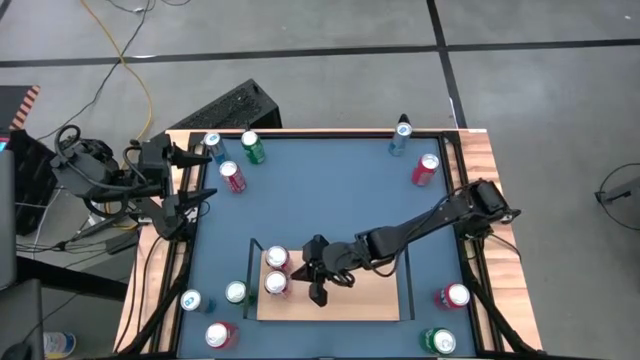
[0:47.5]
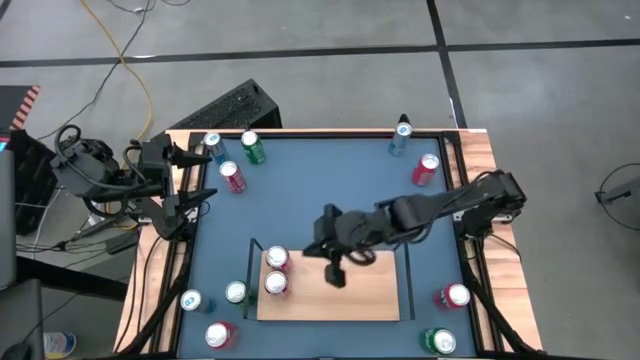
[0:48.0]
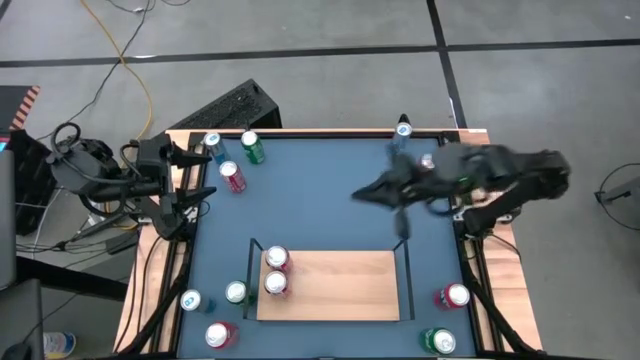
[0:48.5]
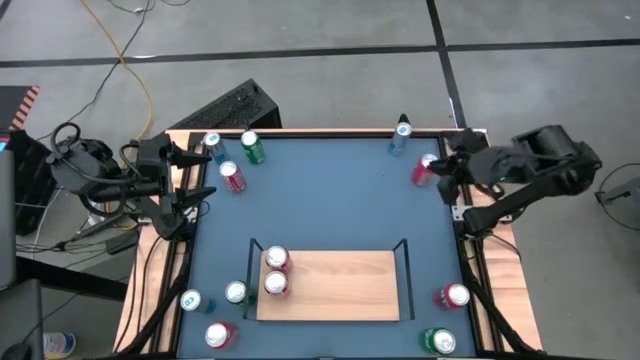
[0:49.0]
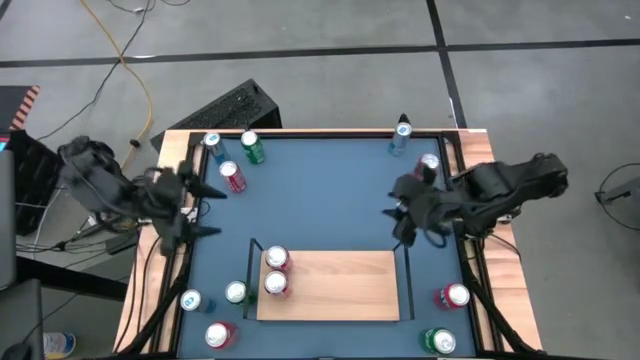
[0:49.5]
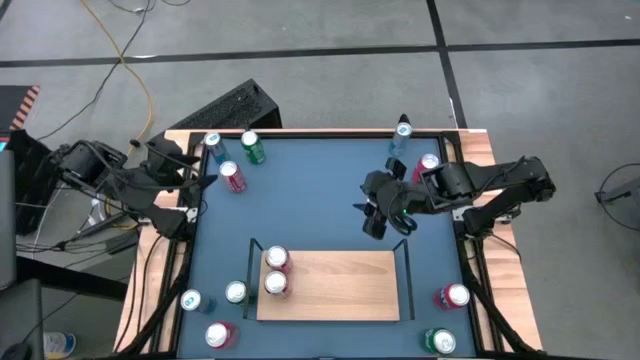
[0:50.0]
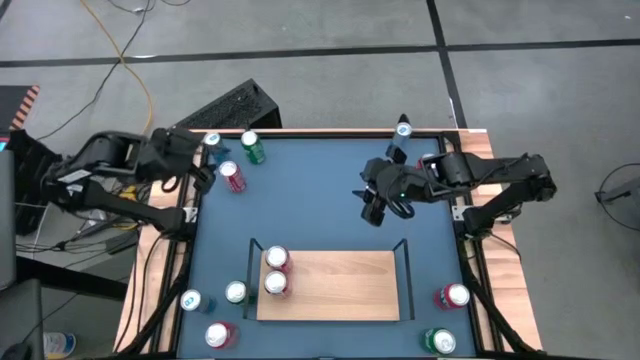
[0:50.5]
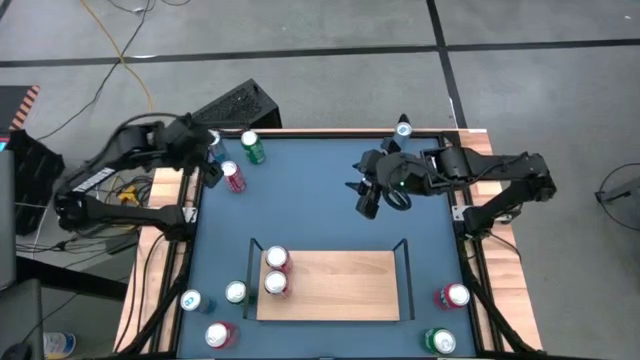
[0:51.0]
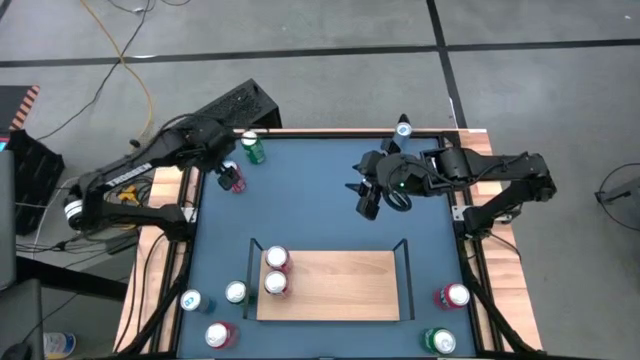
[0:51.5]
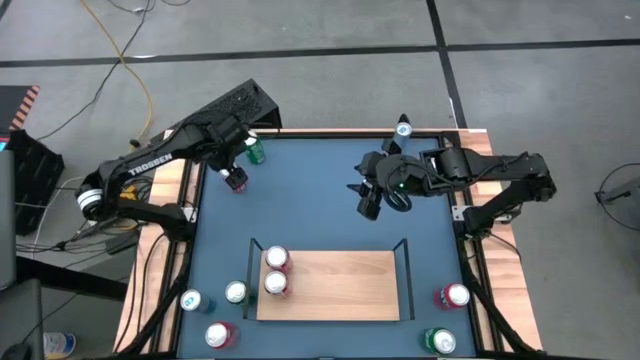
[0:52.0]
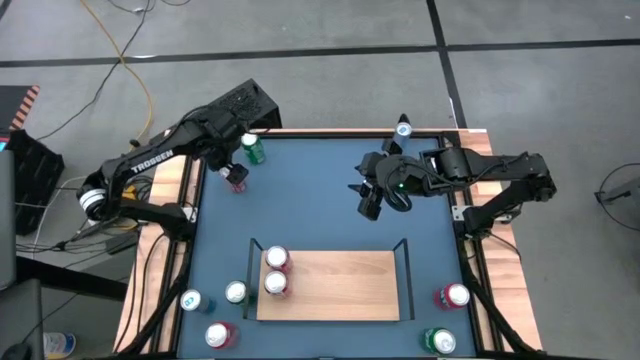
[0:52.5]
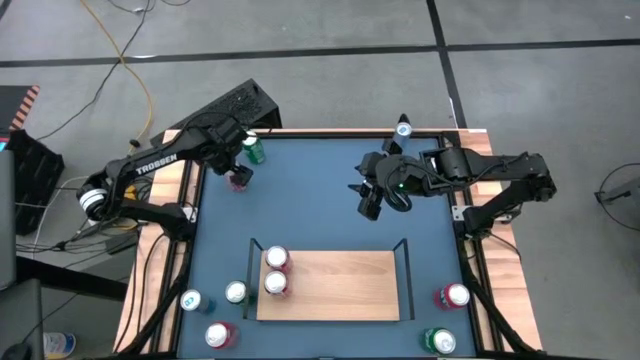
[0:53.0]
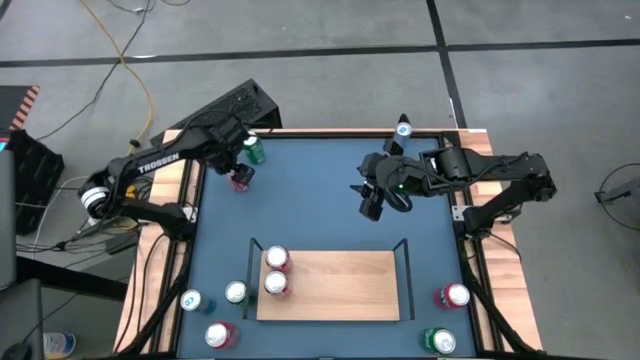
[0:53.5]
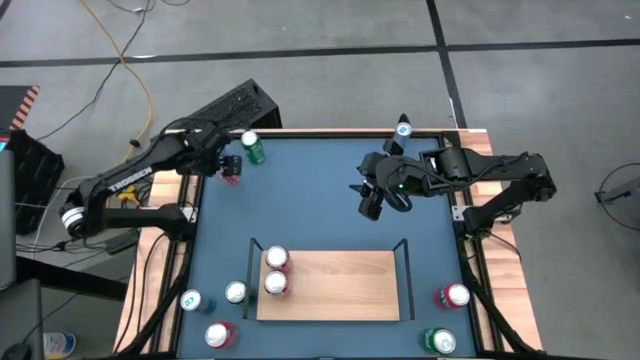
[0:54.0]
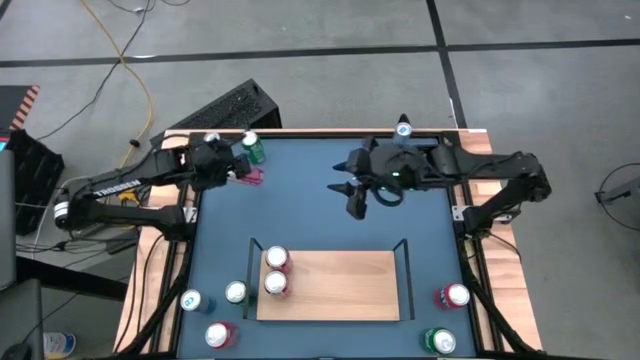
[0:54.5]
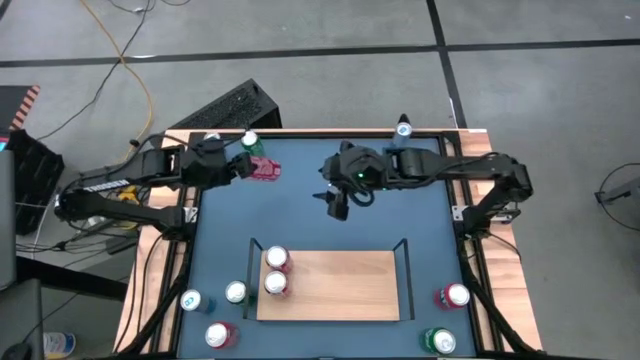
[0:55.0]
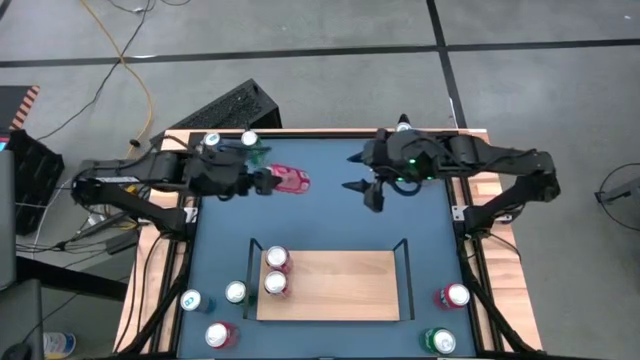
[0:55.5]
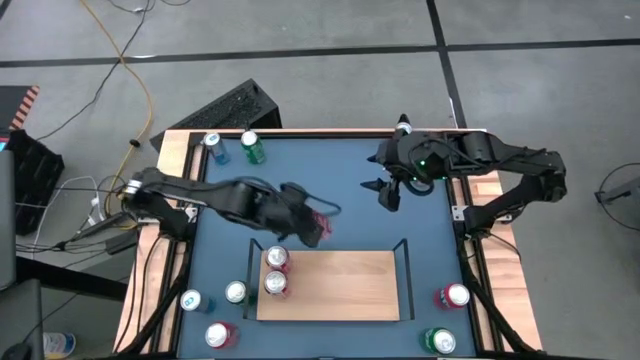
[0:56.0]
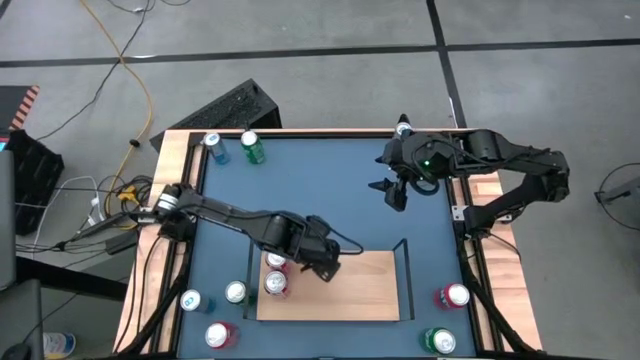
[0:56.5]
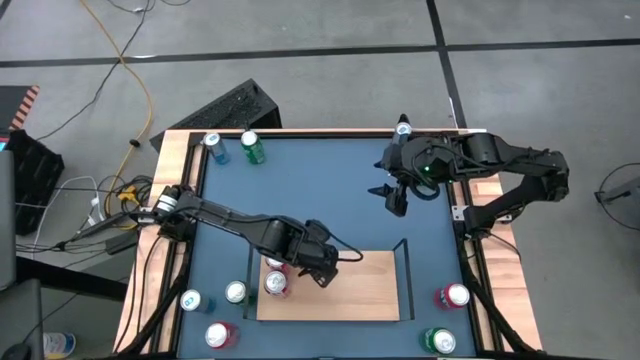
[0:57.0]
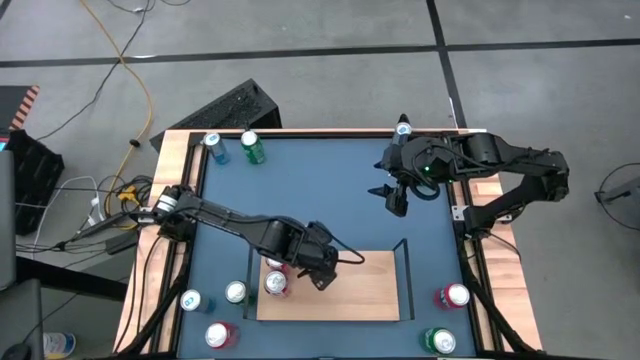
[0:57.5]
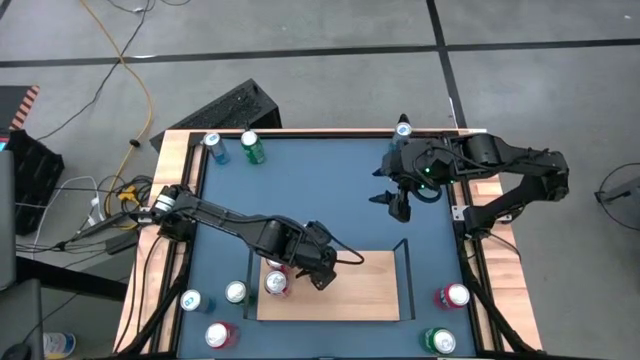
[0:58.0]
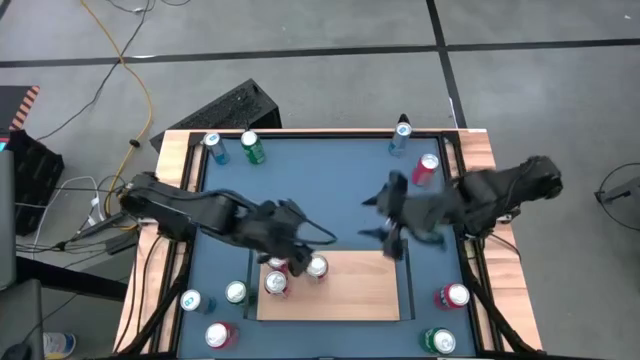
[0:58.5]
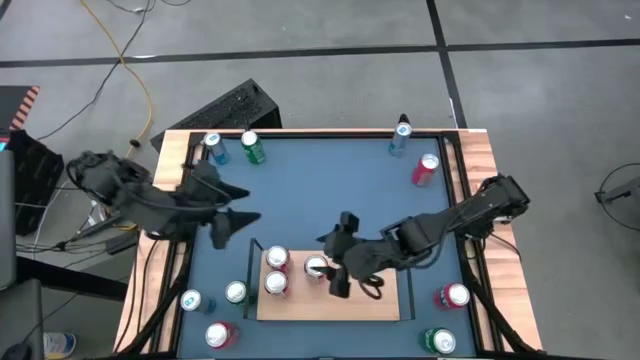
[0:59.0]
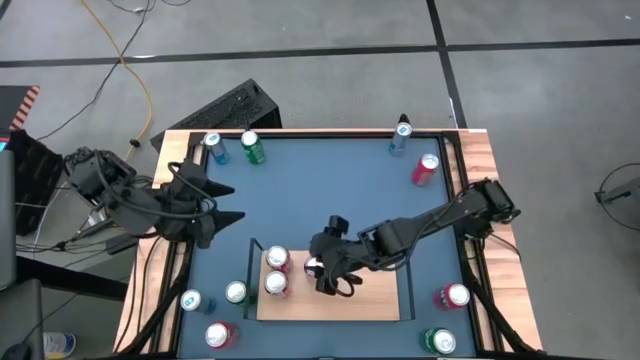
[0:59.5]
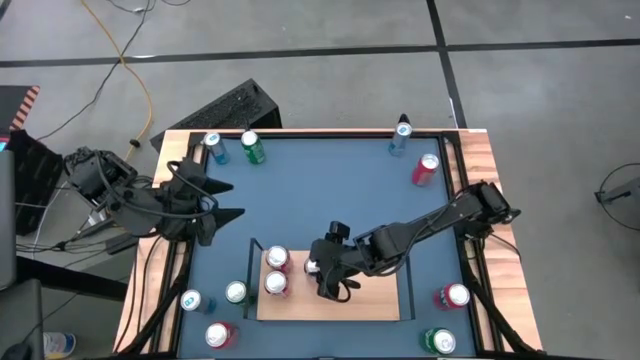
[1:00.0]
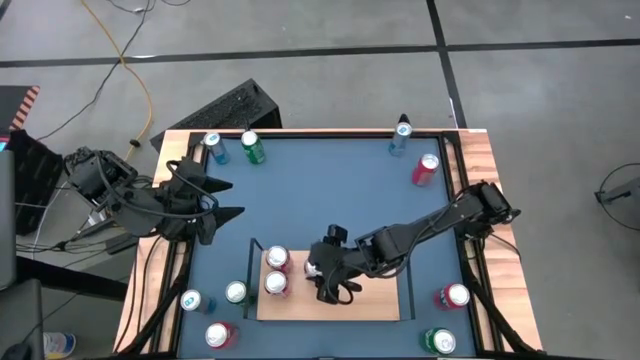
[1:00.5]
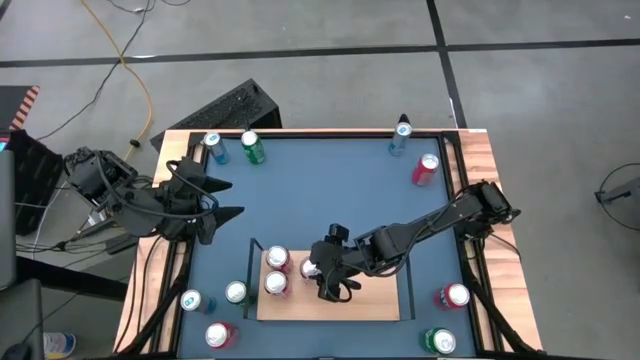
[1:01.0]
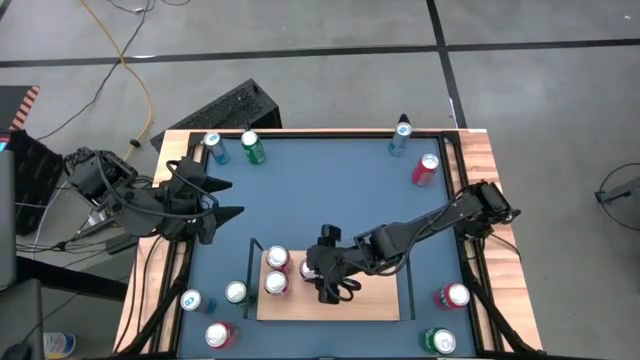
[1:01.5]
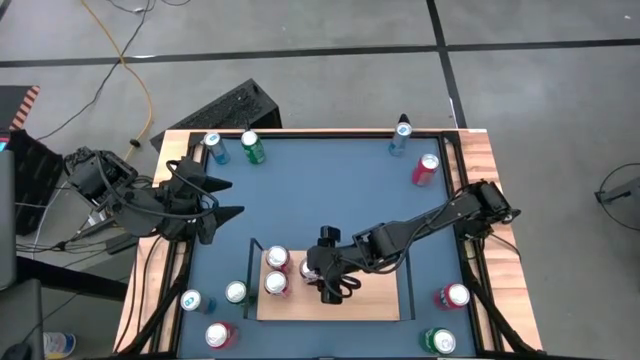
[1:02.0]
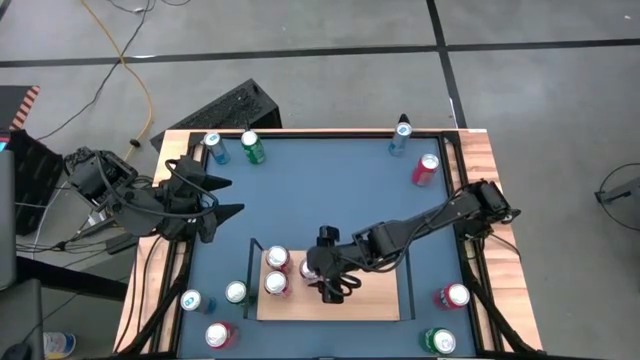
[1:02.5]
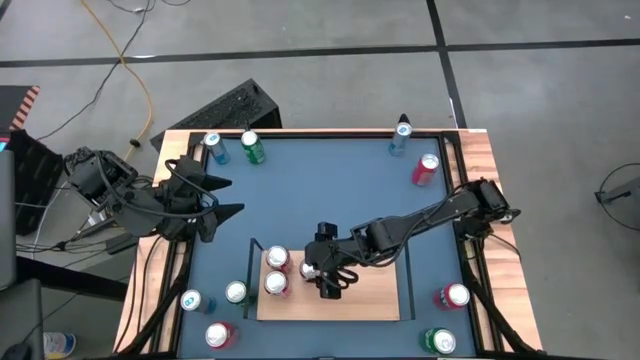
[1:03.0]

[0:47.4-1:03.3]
Task: Place canned beverage on shelf
Put the red soda can on the shelf aligned with the other red soda can

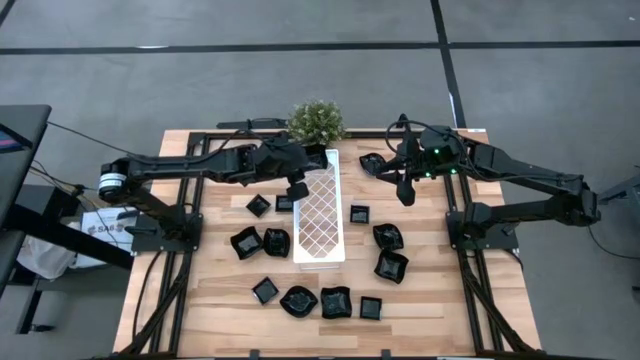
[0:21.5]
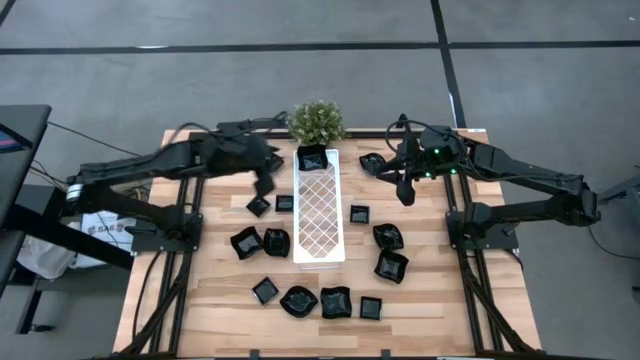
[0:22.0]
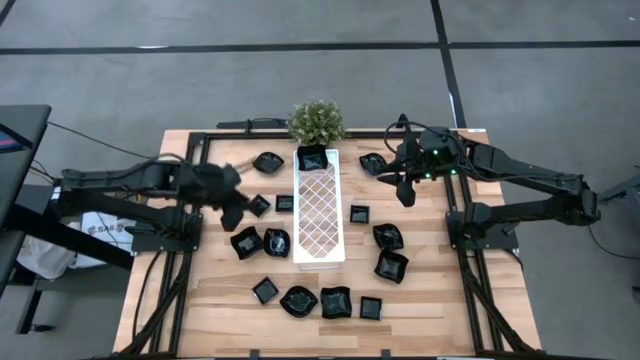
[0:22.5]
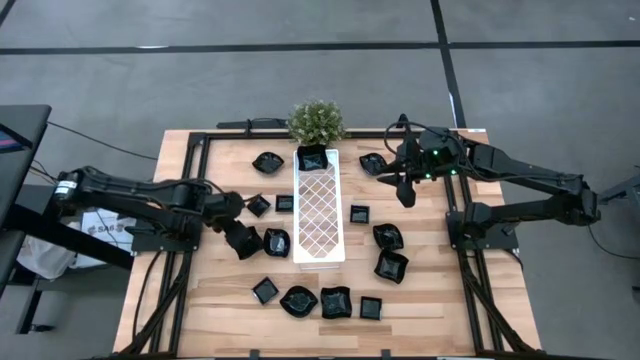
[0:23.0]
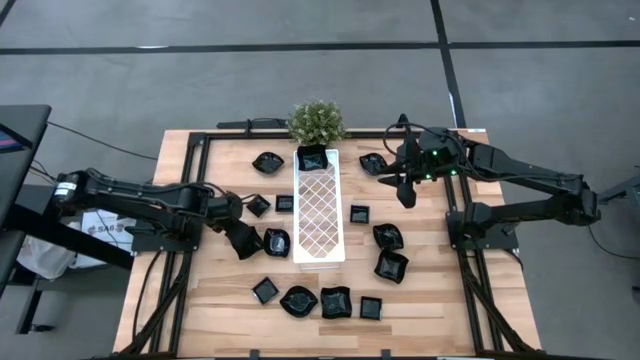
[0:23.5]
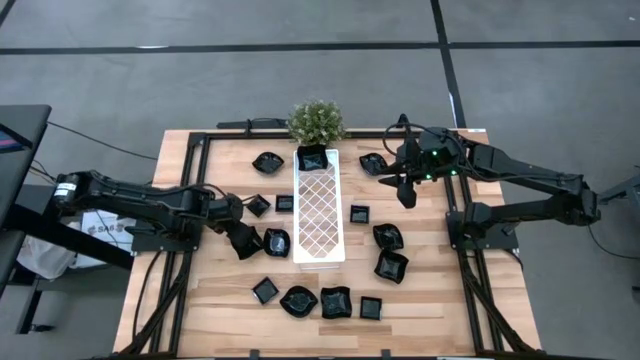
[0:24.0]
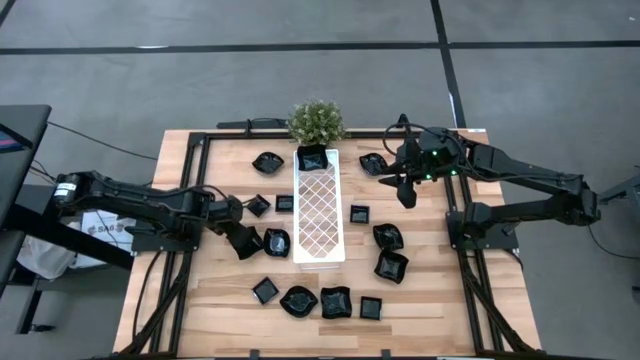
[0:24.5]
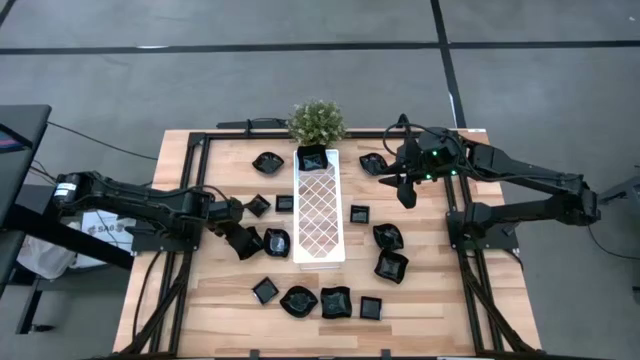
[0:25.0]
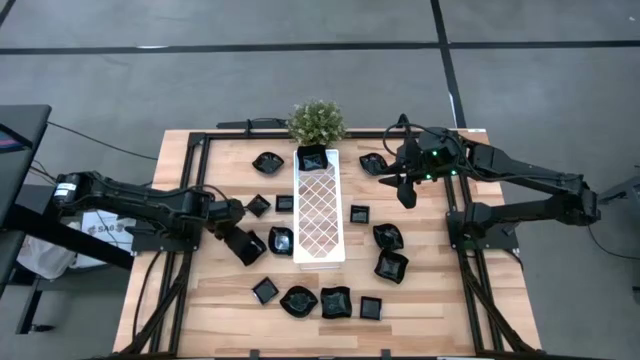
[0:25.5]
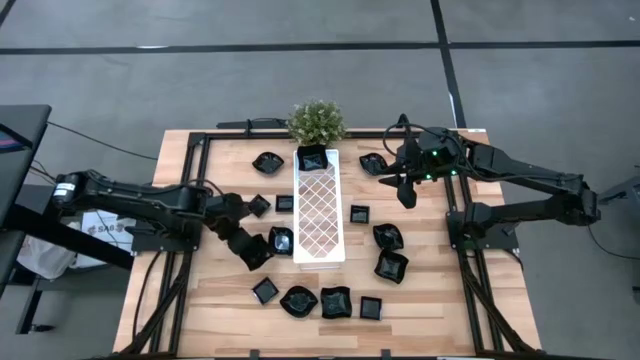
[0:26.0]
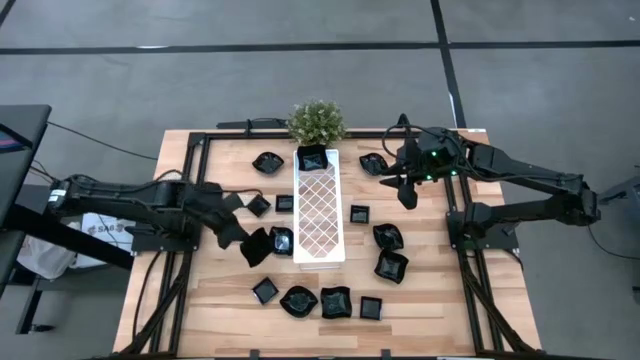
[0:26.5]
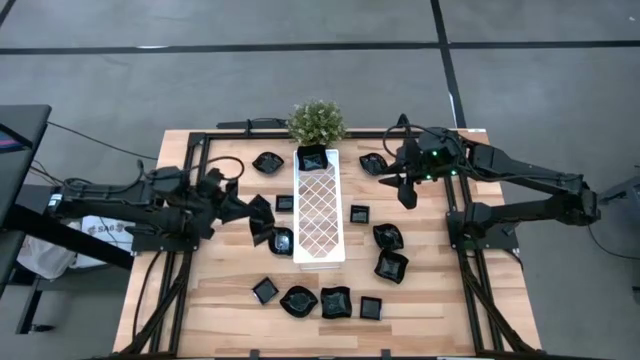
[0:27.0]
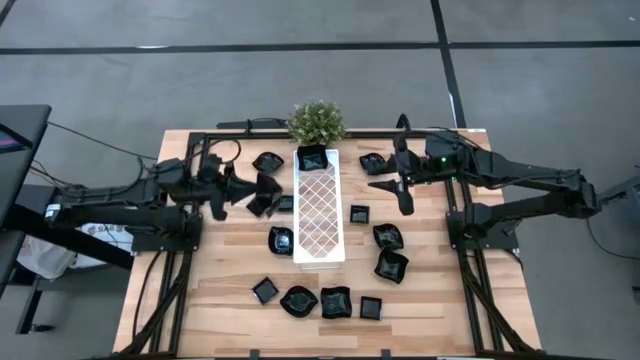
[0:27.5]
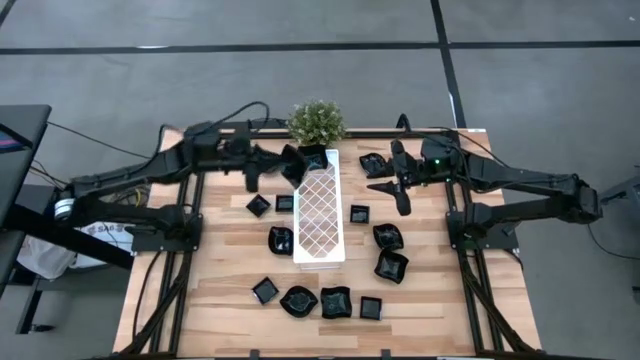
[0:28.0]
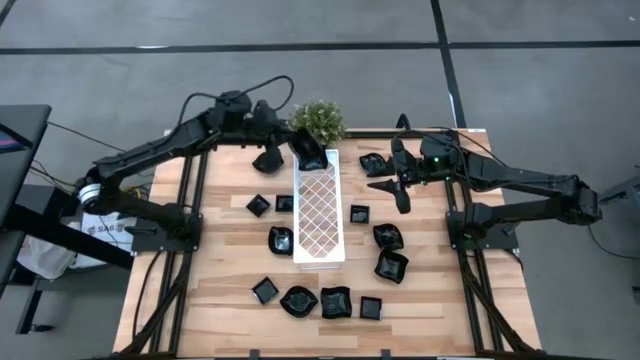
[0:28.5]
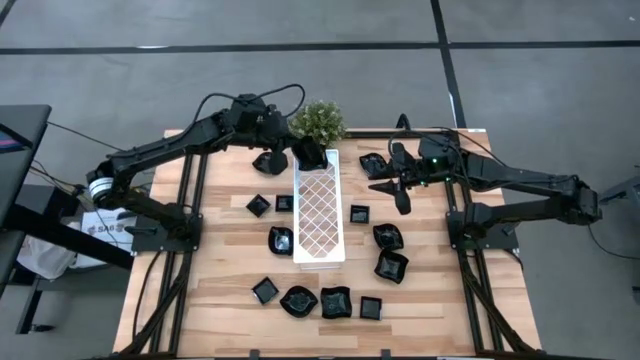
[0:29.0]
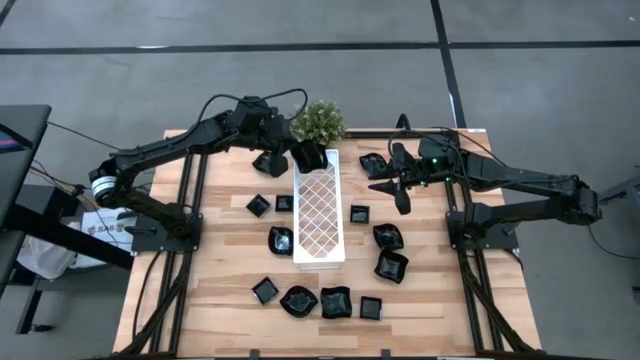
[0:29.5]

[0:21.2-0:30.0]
Task: Pick & Place Mini shaped plates
Stack the top left distorted square plate on the other distorted square plate on the shelf
